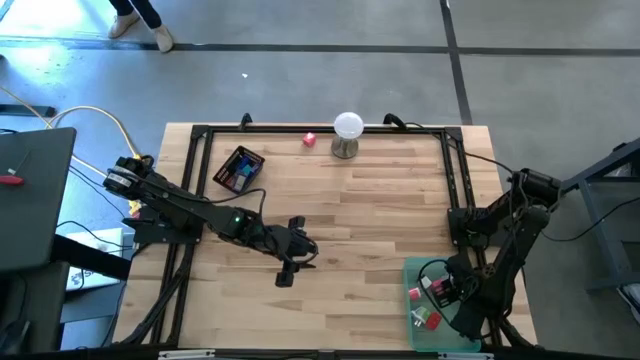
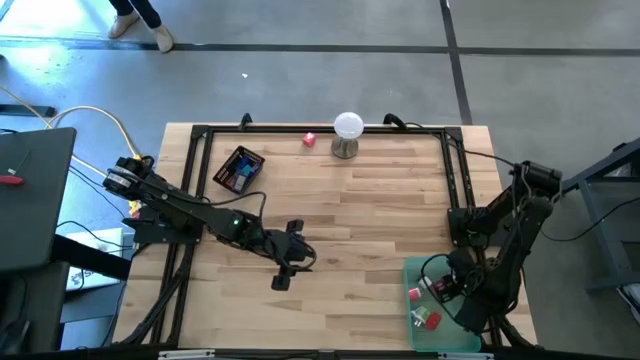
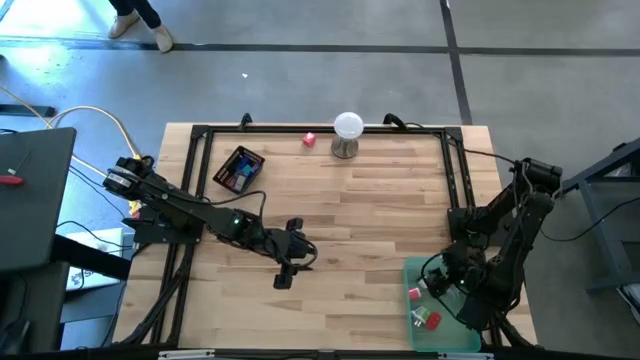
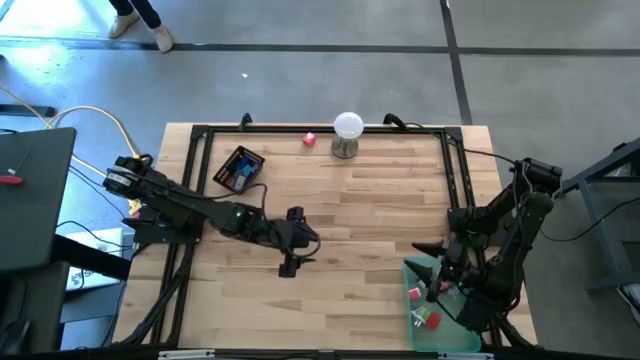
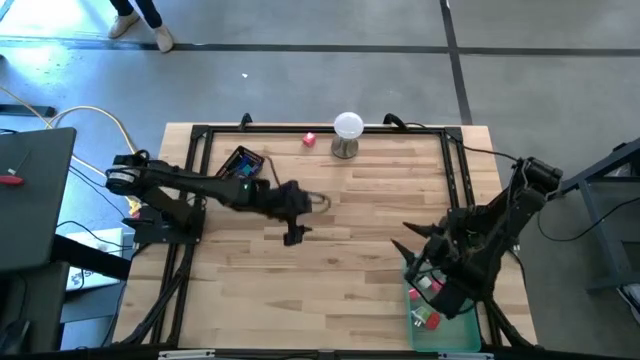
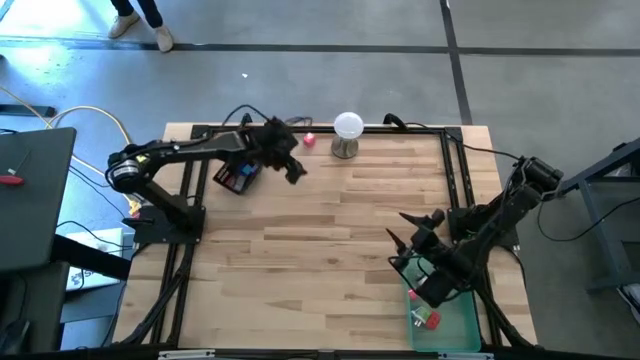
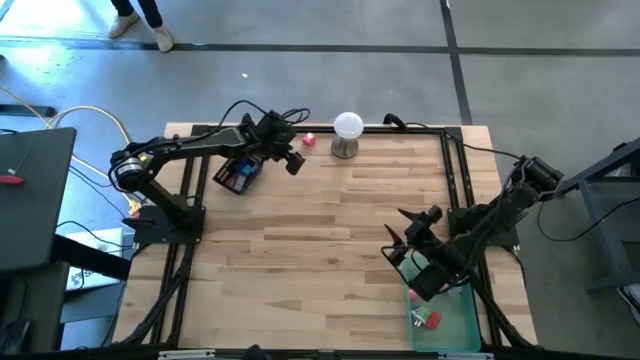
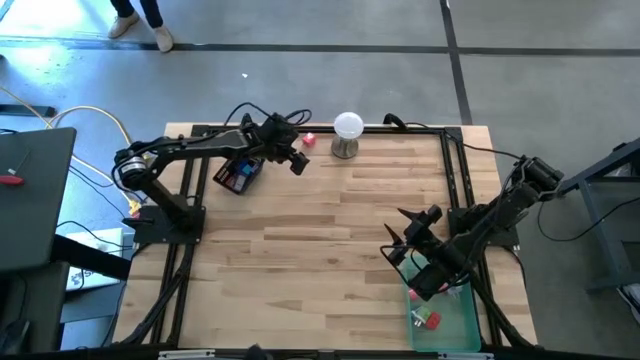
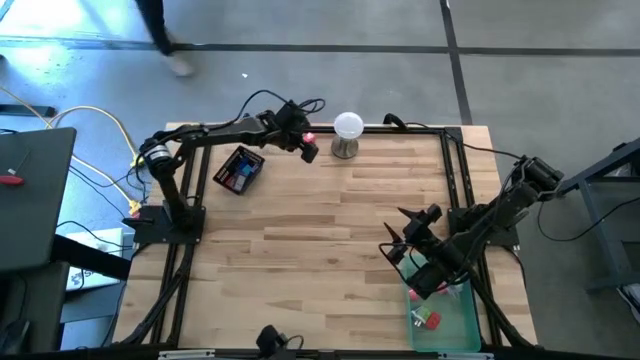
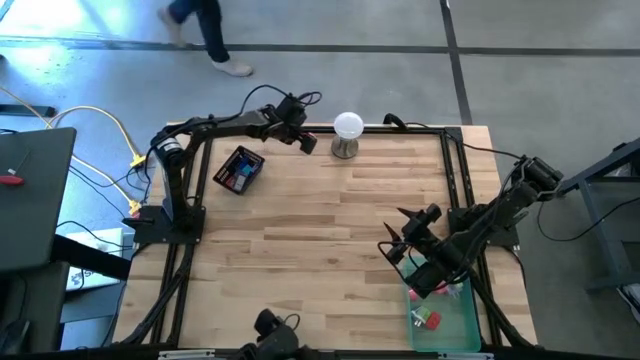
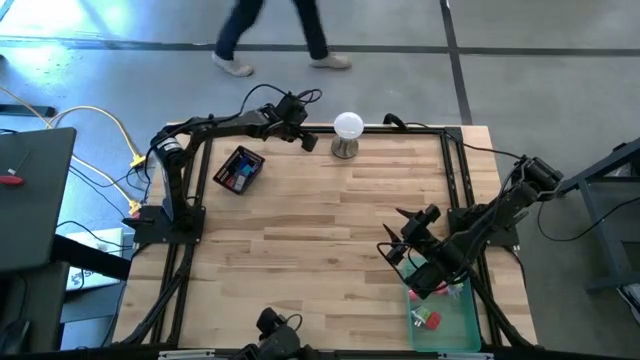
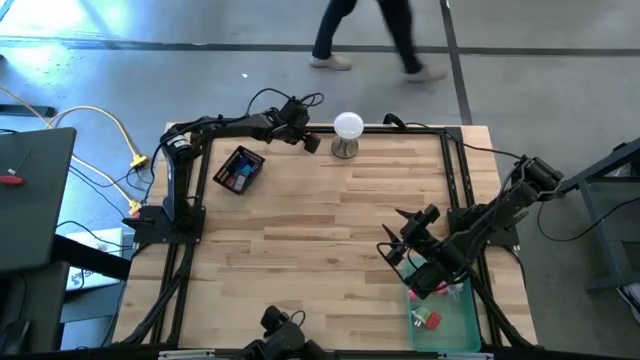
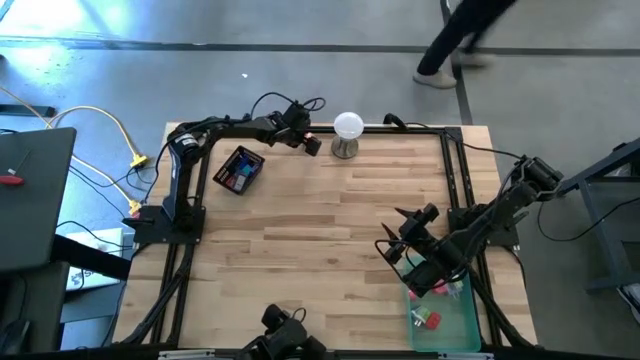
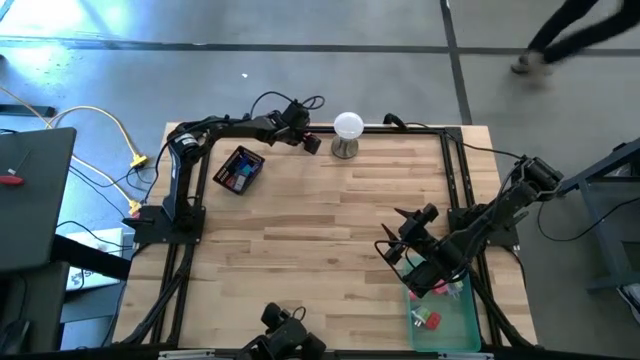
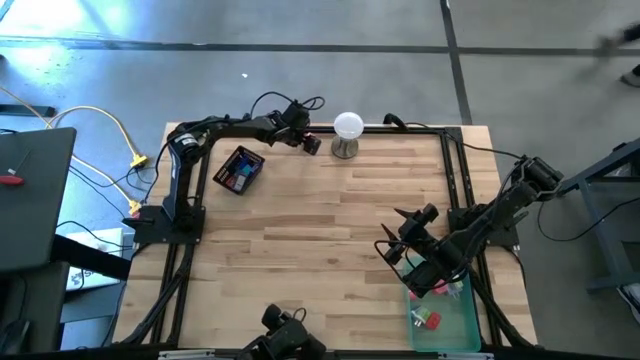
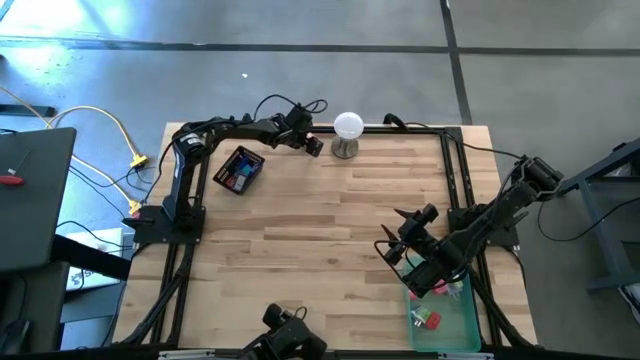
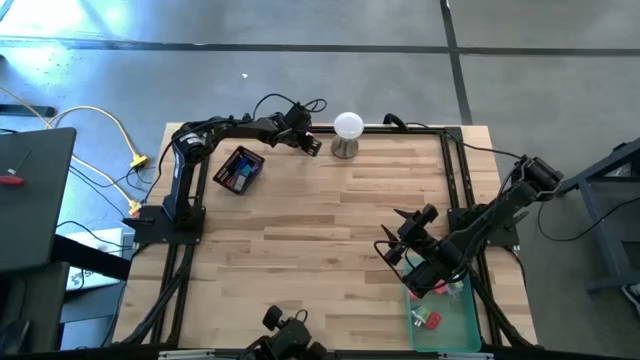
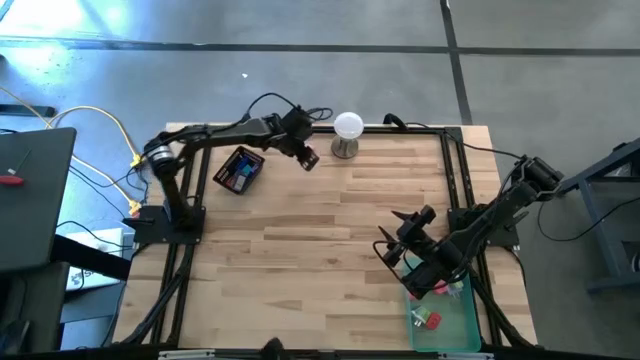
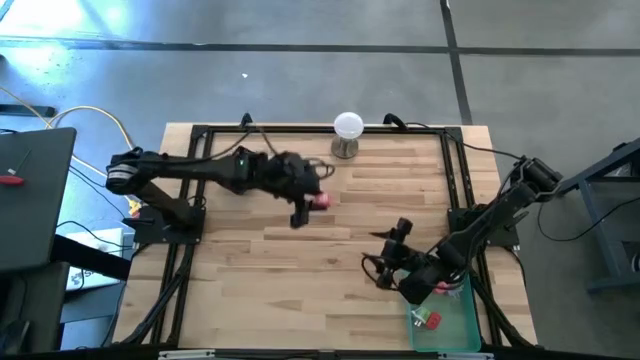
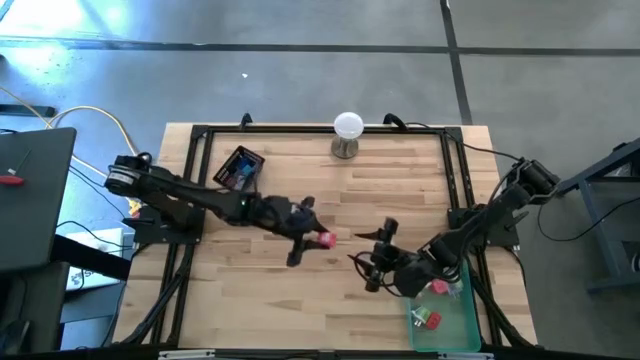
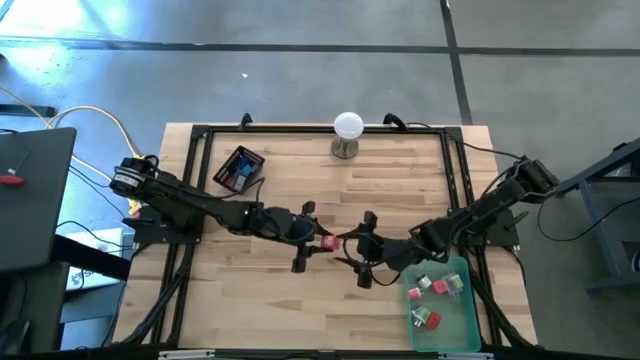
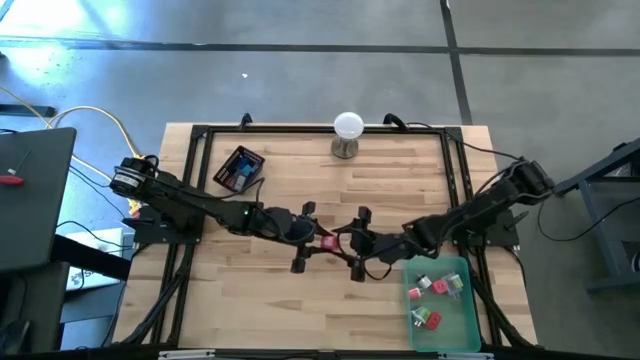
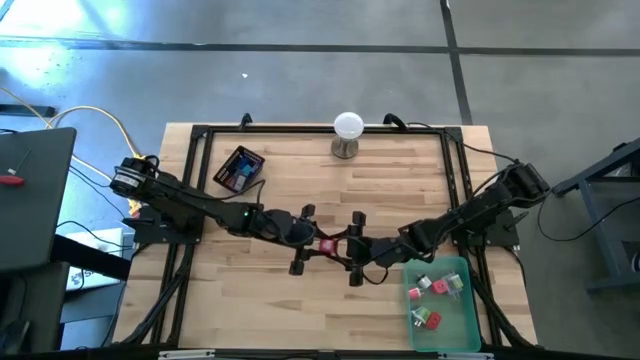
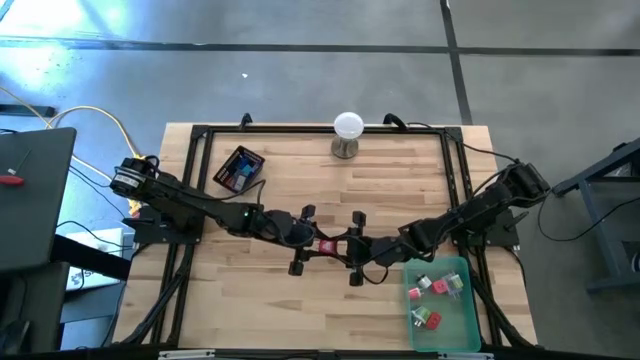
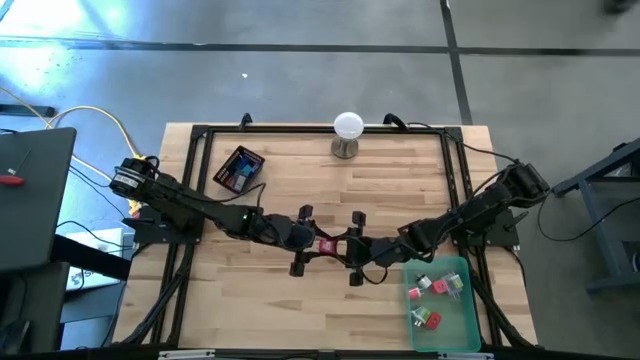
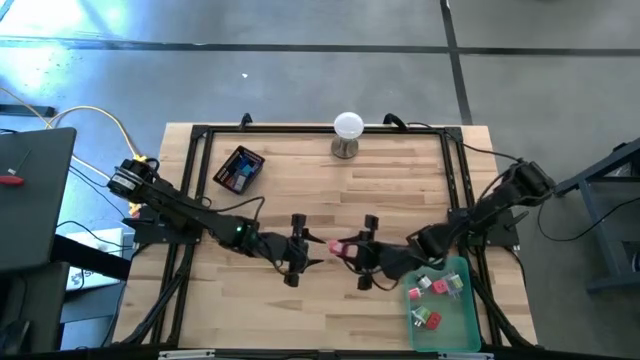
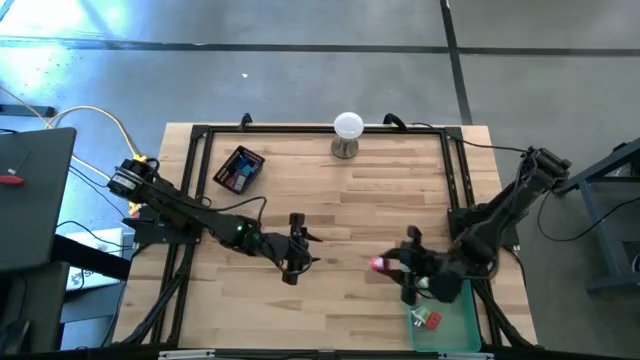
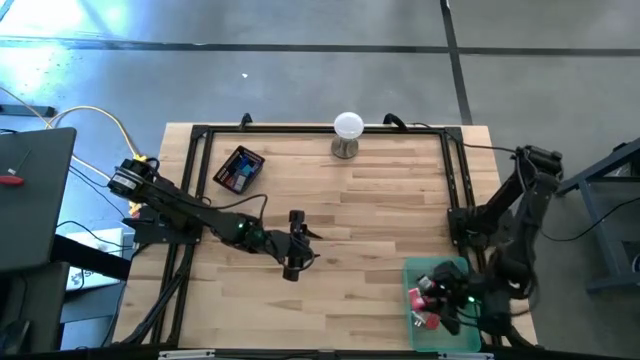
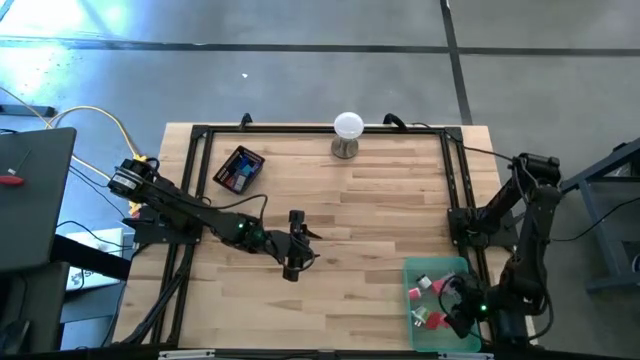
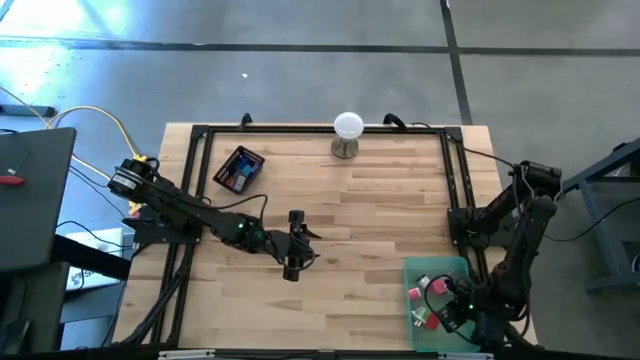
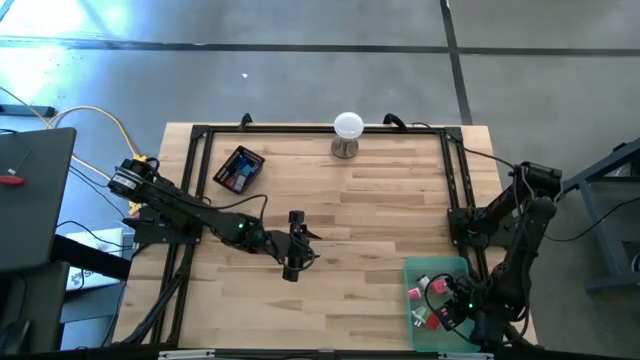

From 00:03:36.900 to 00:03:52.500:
Task: Pick & Place Office items
Put the pink charger adapter into the green bin

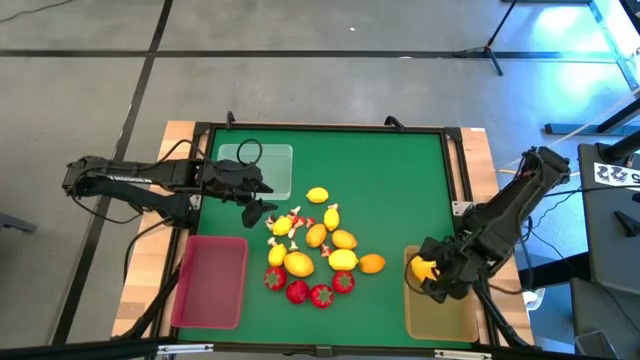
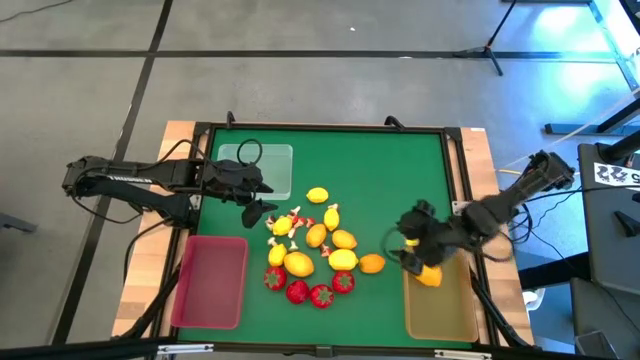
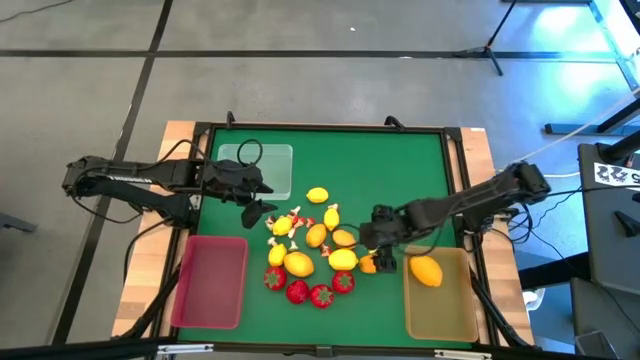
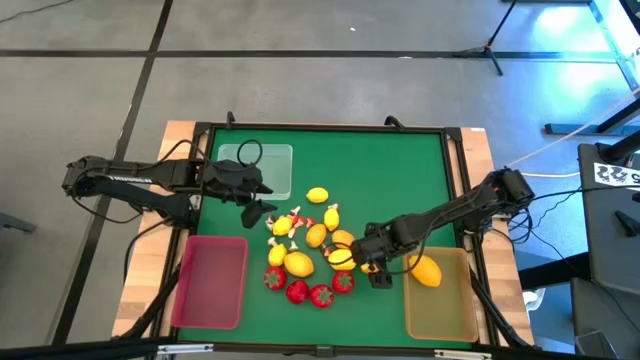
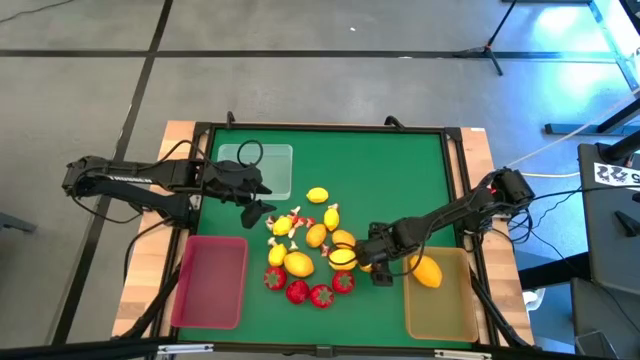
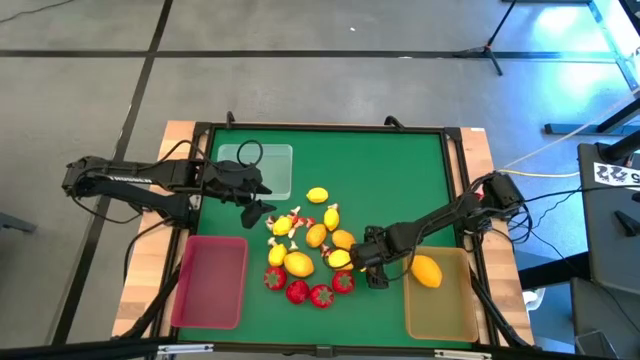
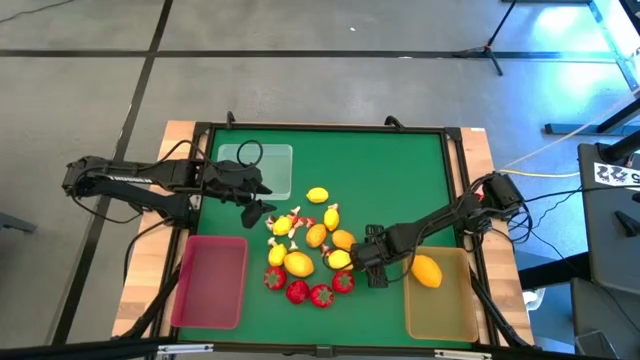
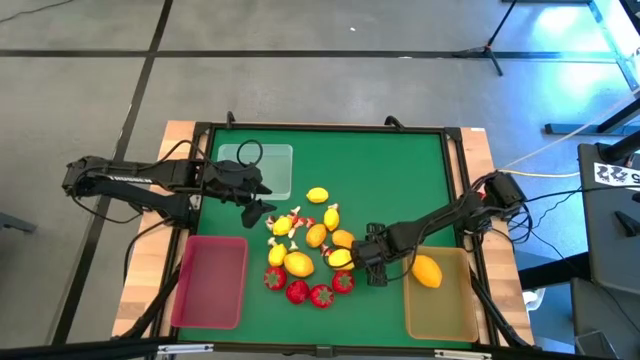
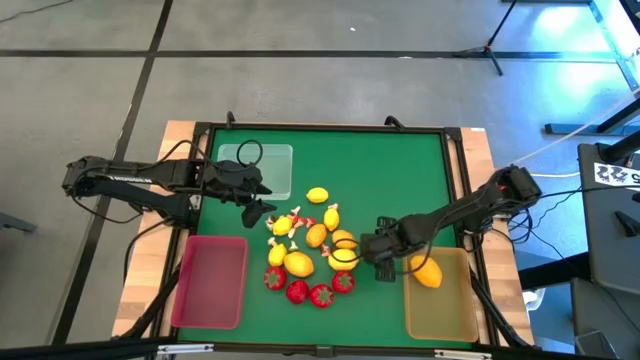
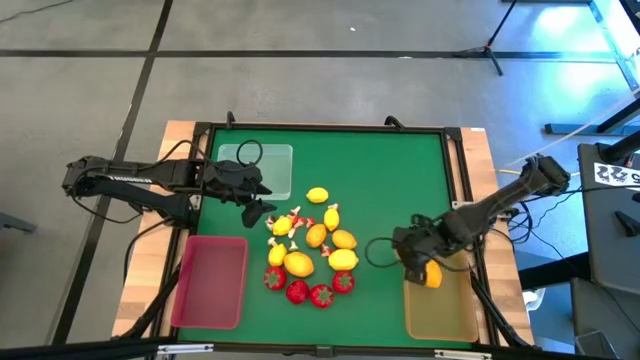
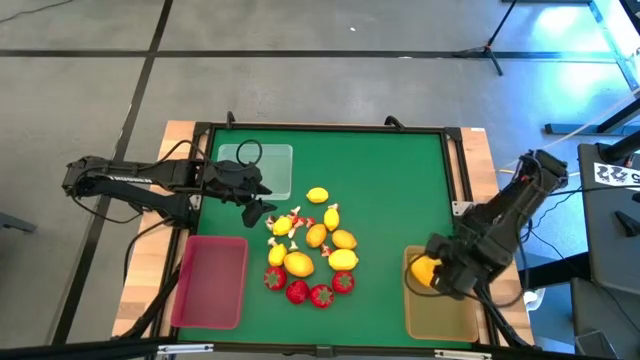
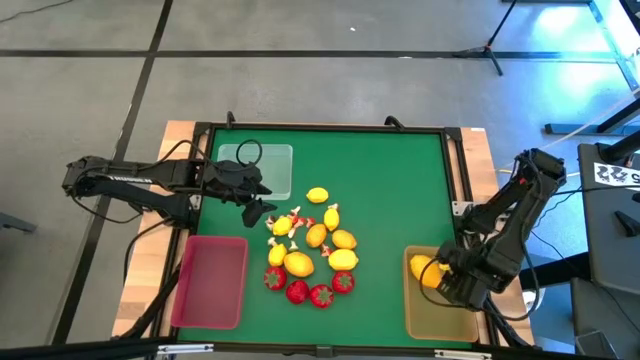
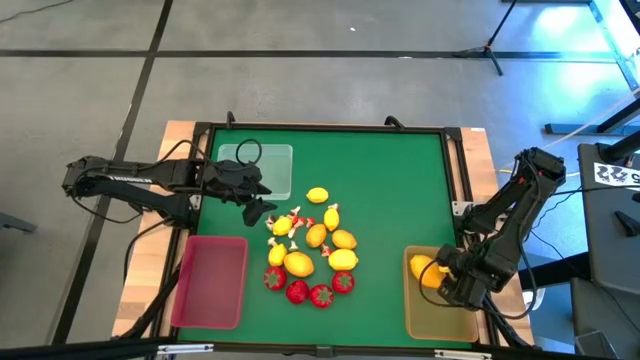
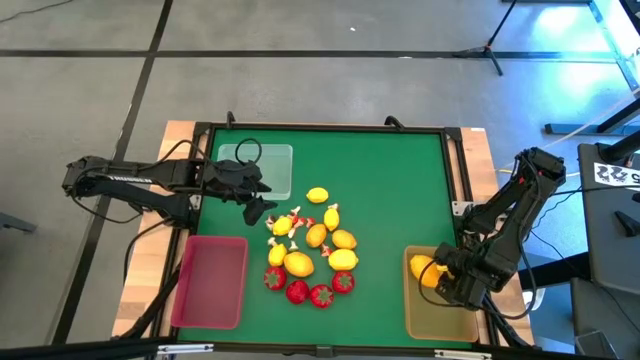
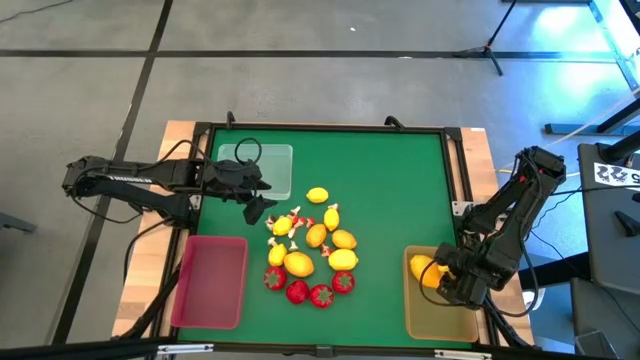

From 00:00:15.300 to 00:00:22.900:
Task: Sort produce into baskets
Put the lemon into the orange bin
